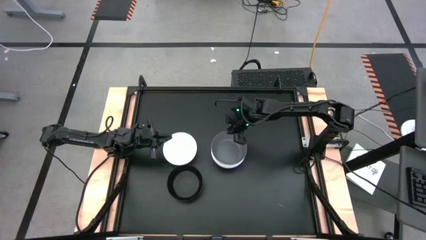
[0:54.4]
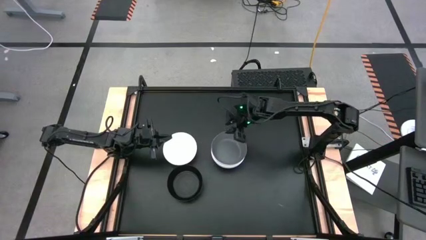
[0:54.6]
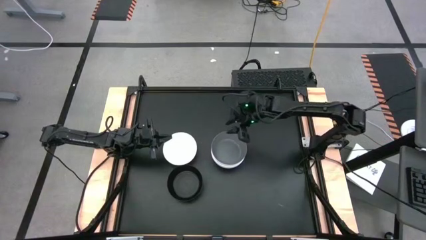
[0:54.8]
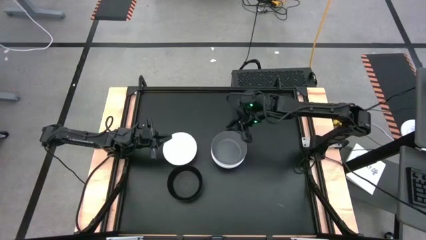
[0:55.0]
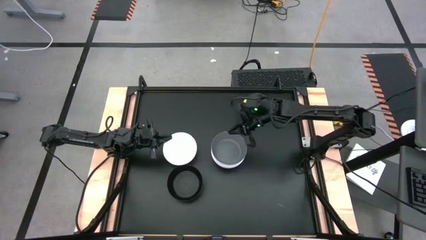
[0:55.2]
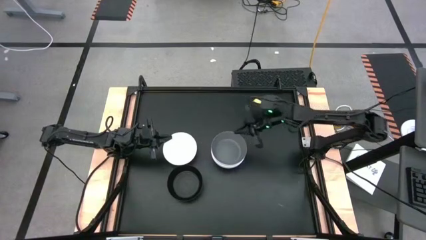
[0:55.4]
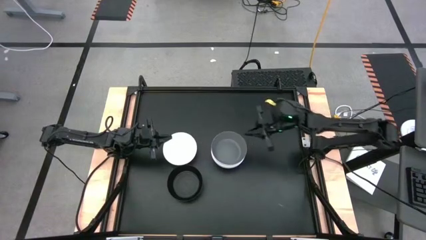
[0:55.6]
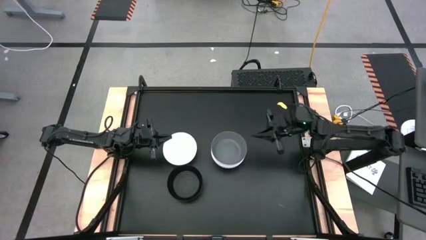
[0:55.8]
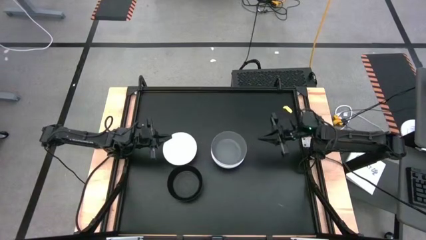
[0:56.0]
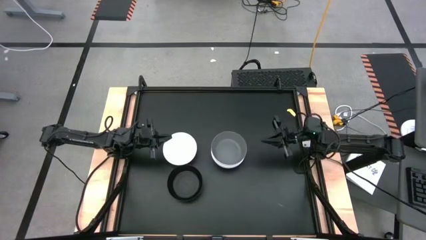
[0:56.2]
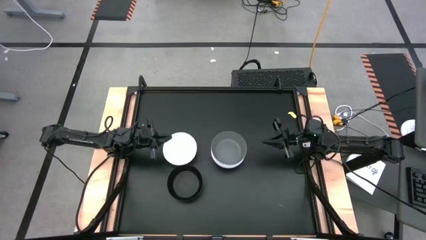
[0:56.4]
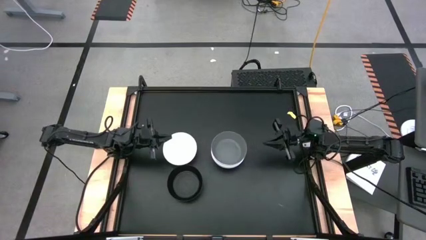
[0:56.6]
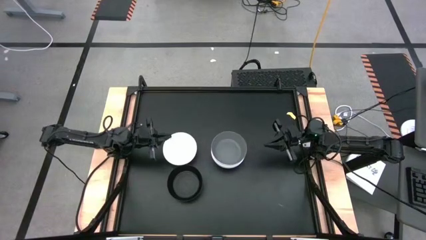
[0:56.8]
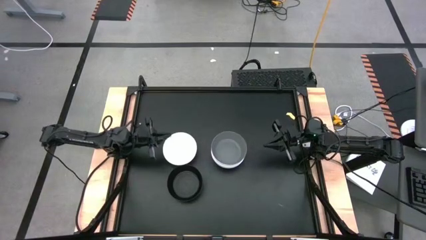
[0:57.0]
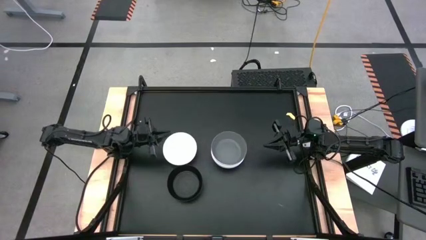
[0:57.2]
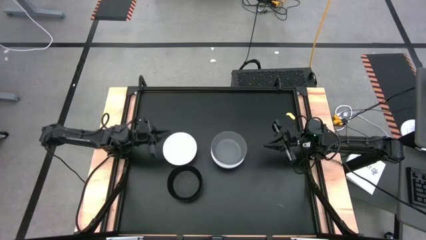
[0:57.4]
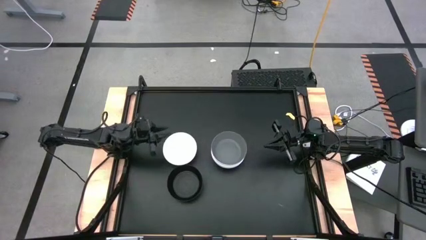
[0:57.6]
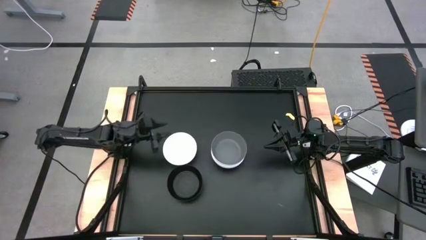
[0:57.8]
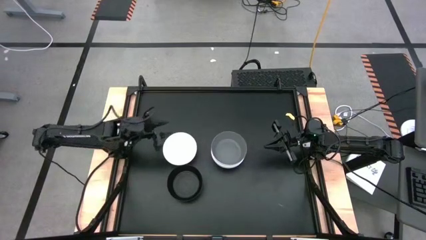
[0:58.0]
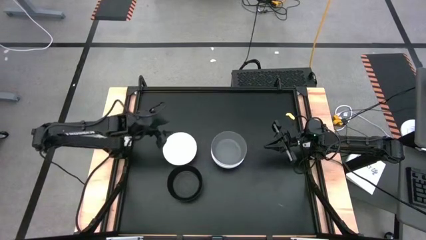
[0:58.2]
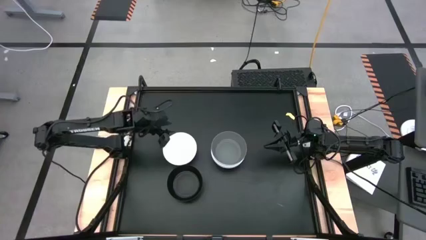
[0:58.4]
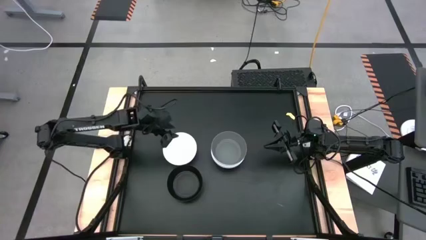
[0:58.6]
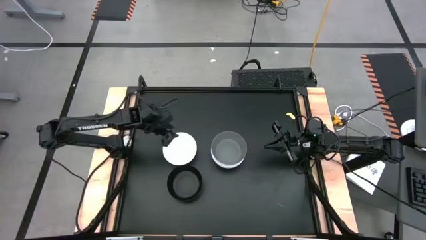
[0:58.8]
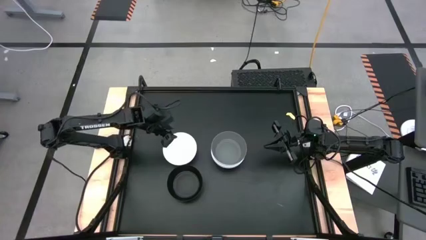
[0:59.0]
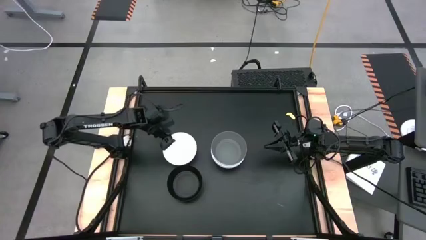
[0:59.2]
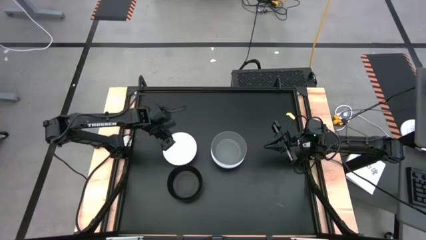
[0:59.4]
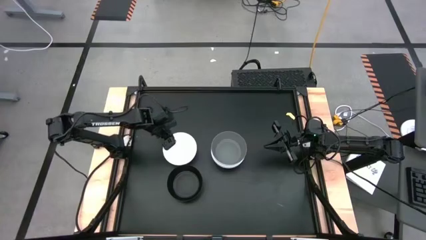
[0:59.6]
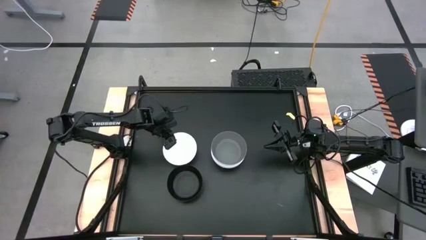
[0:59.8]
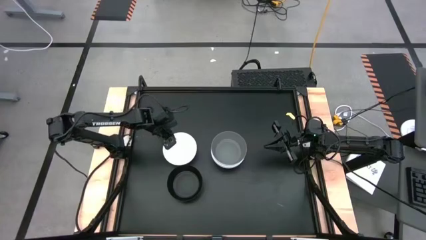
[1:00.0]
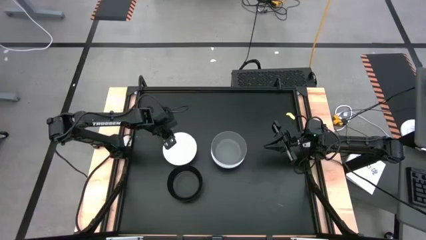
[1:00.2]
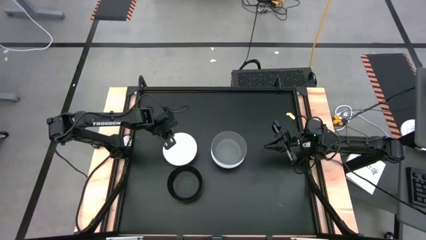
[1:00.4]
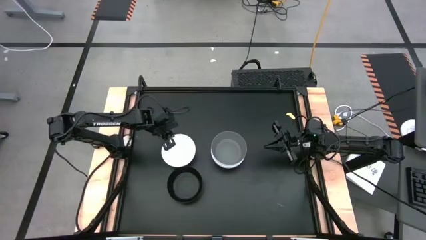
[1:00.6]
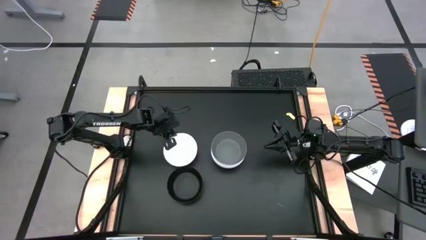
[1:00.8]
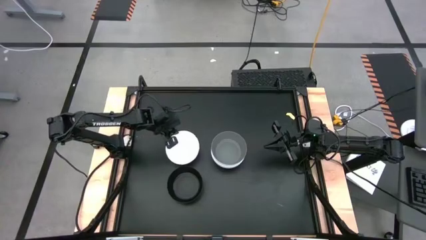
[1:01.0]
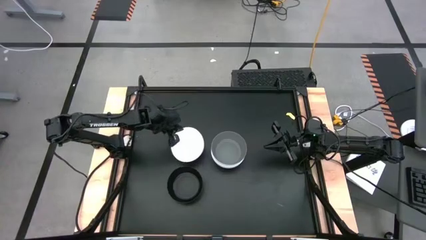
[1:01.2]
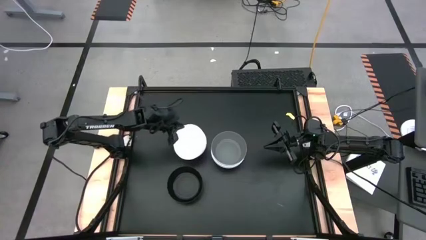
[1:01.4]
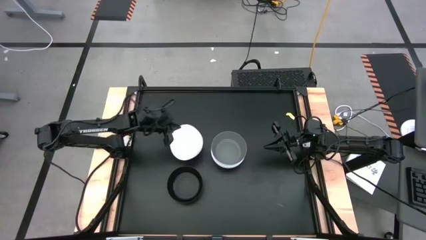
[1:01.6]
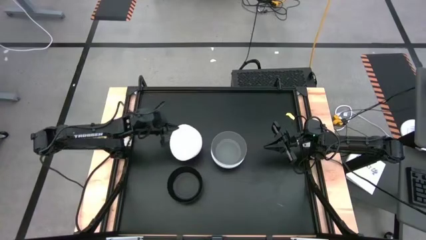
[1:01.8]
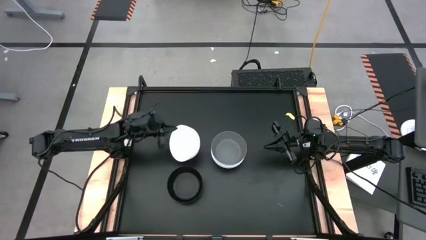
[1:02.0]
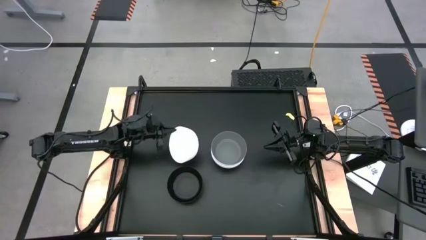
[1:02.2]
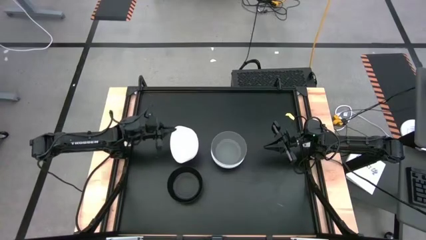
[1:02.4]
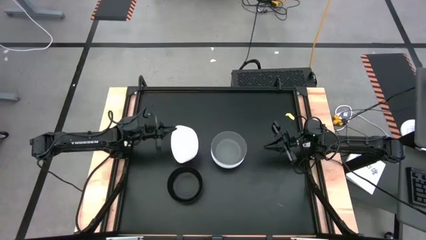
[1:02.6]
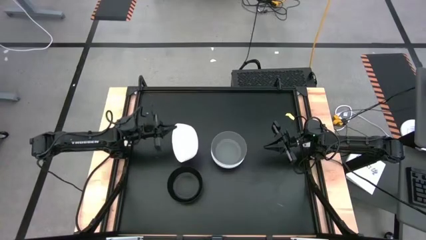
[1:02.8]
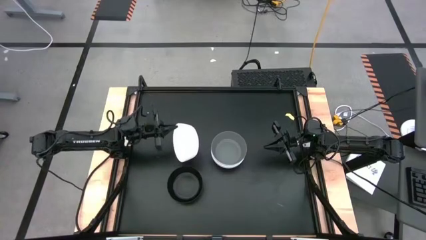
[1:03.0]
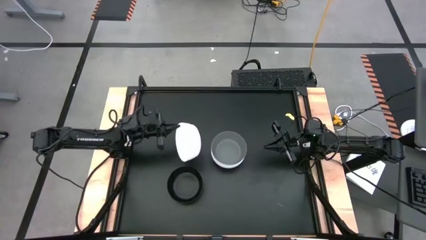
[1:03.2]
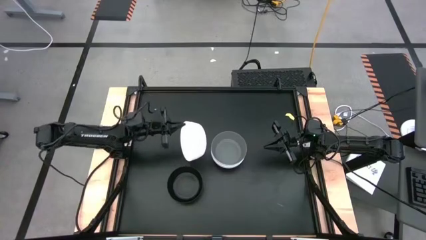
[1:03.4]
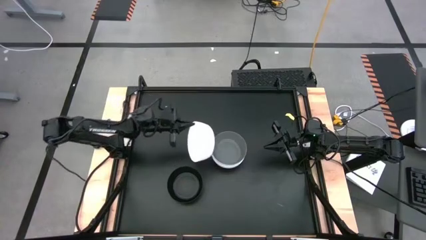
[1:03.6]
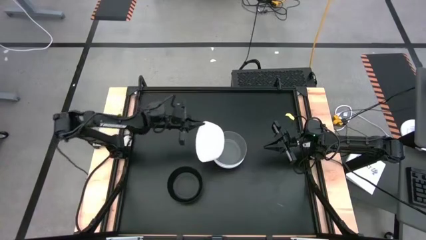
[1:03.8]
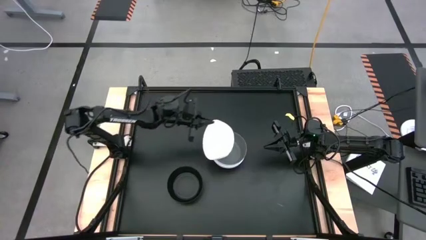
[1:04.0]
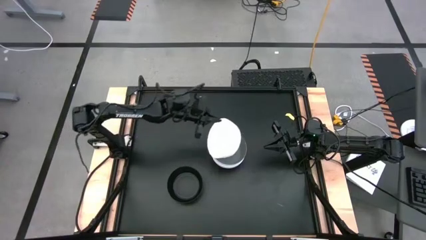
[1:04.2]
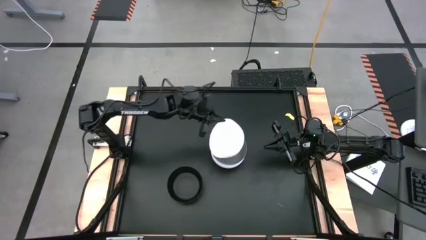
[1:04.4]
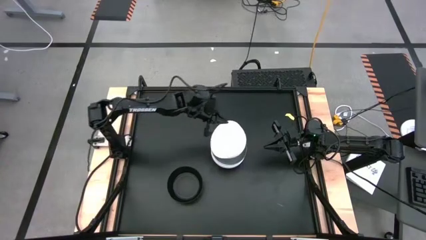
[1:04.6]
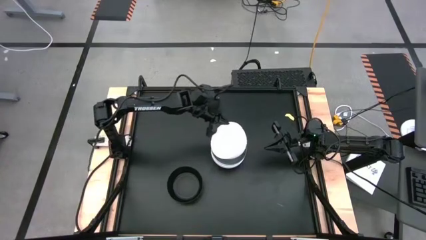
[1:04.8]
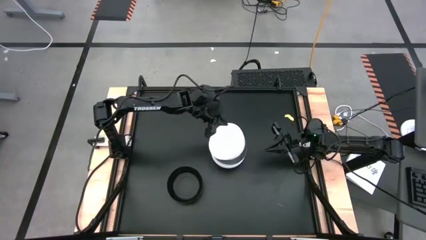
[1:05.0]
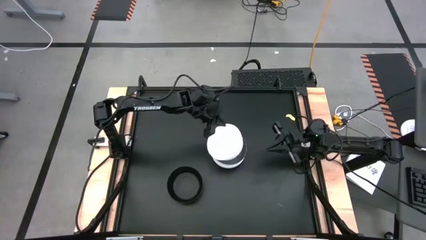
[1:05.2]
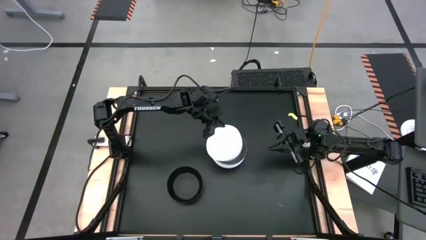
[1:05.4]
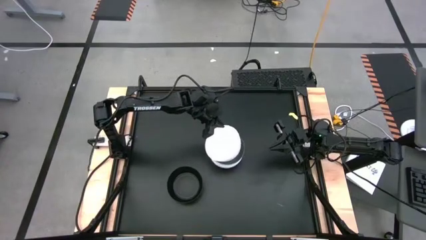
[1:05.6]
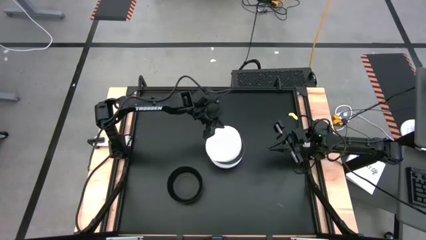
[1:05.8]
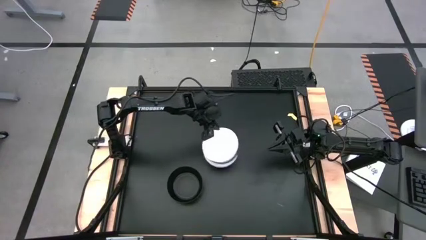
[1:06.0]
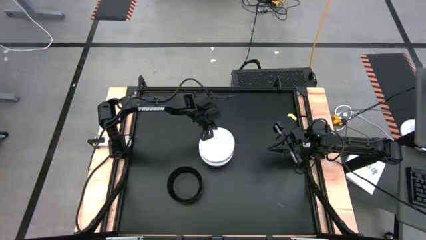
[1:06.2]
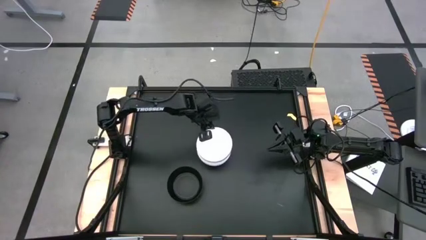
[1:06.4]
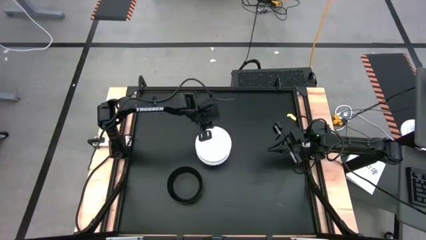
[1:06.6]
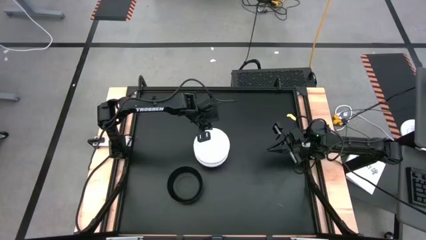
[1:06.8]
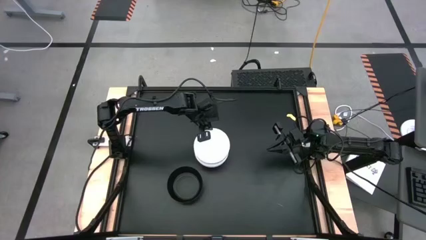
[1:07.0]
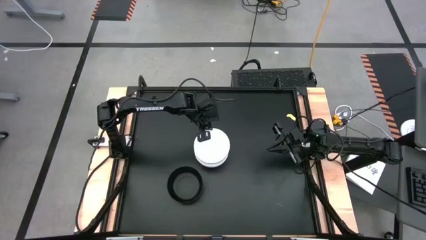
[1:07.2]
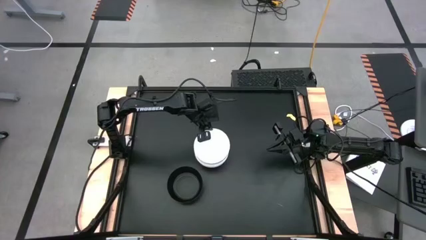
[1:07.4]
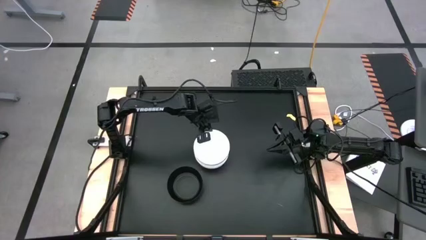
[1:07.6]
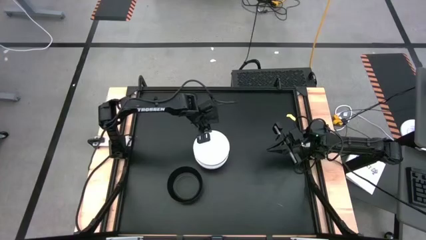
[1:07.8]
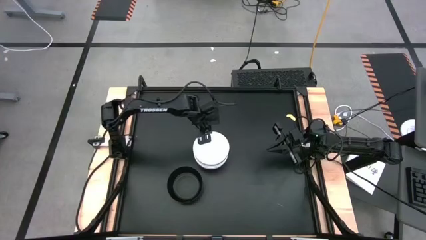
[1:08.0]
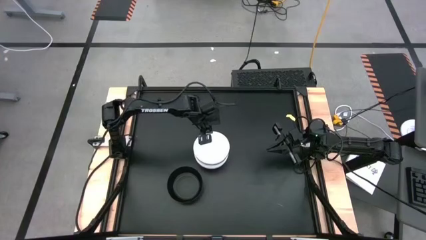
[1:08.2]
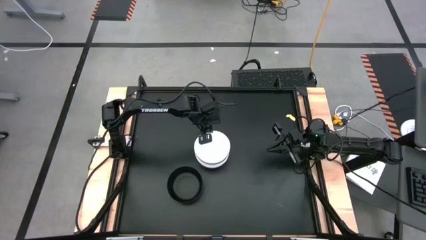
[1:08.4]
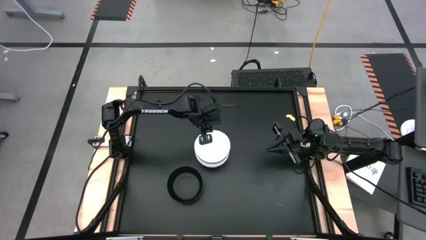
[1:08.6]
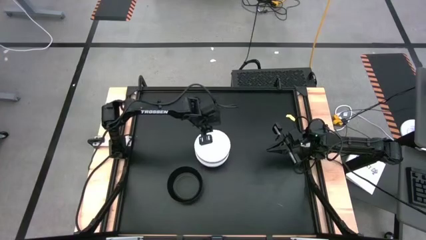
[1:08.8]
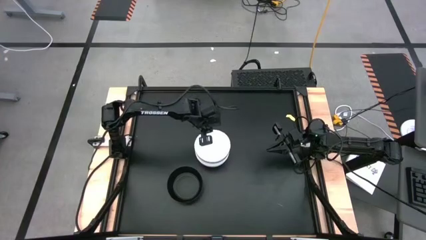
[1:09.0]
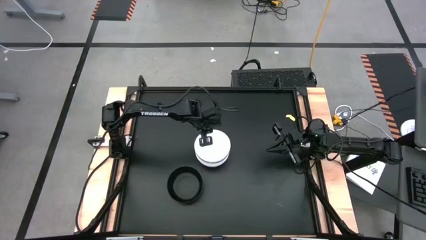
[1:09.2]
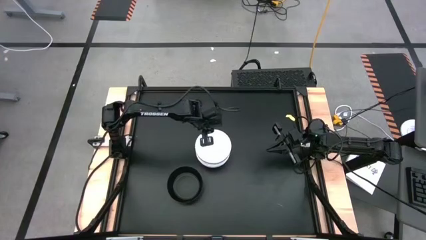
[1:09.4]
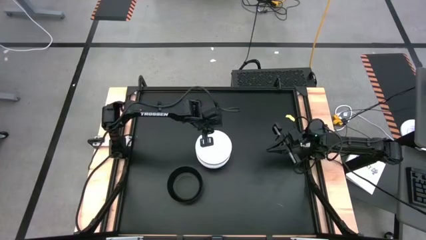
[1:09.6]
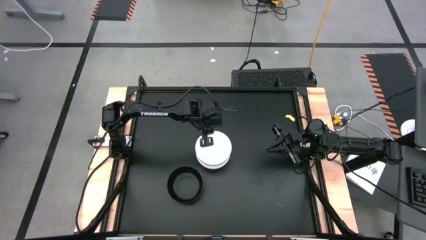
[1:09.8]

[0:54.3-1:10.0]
Task: Nest bowls inside each other
Stack the white bowl into the gray bowl
